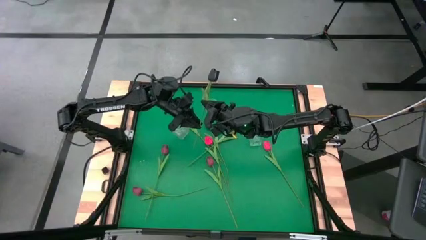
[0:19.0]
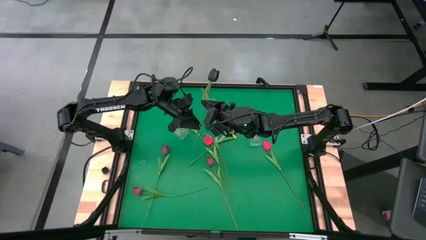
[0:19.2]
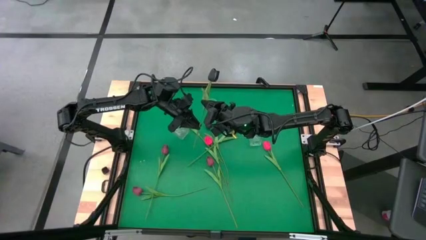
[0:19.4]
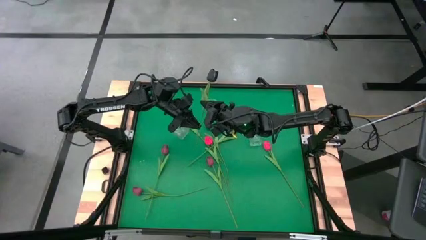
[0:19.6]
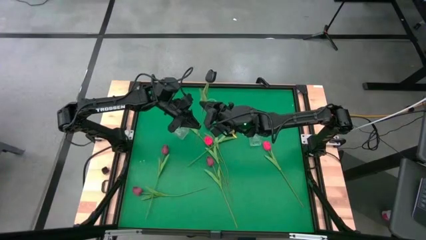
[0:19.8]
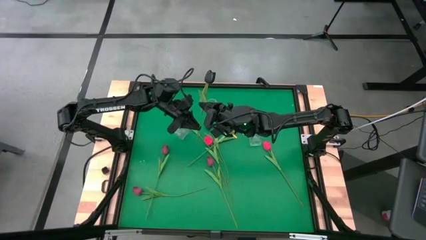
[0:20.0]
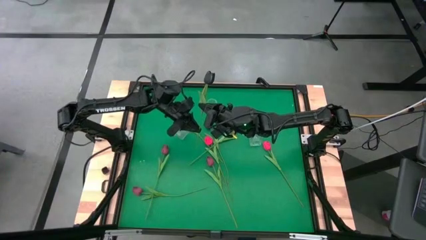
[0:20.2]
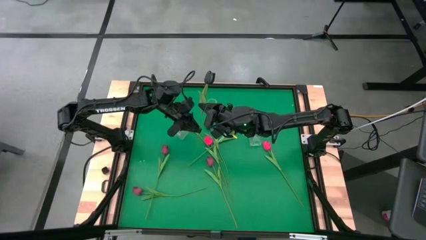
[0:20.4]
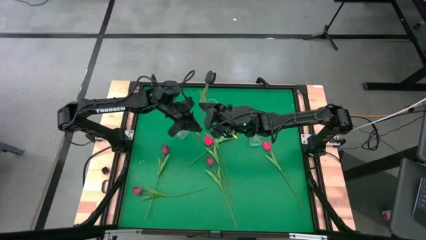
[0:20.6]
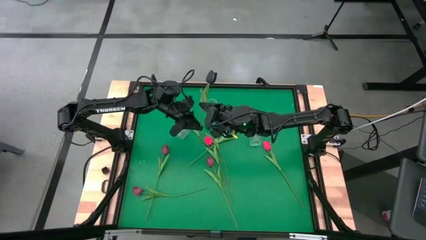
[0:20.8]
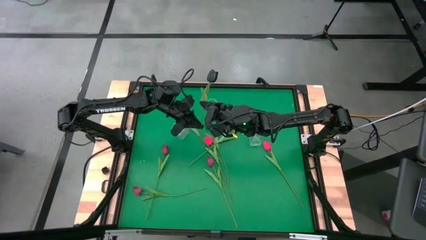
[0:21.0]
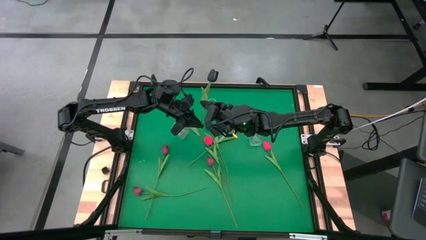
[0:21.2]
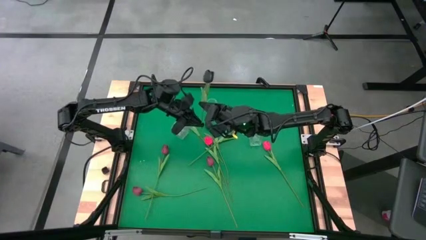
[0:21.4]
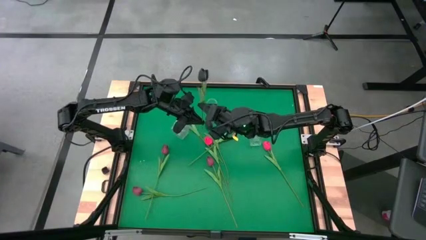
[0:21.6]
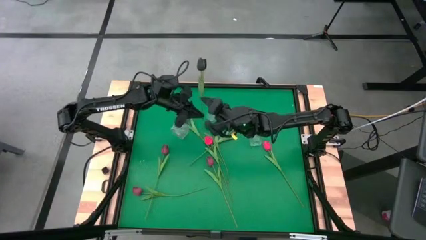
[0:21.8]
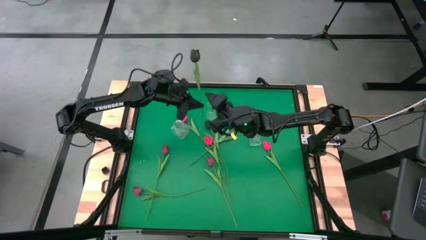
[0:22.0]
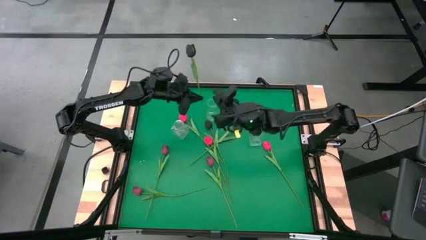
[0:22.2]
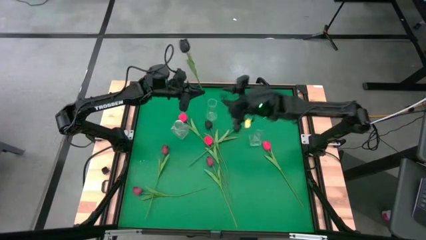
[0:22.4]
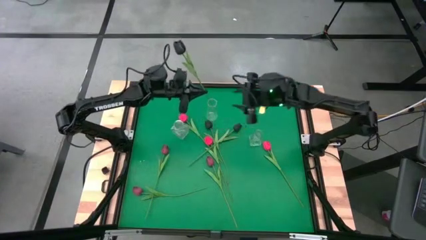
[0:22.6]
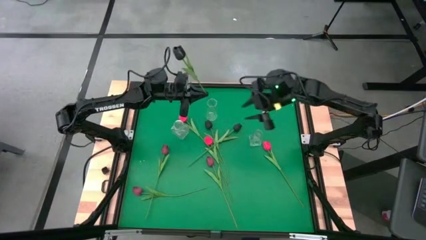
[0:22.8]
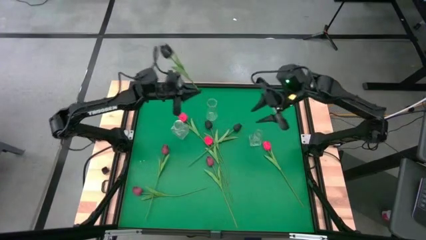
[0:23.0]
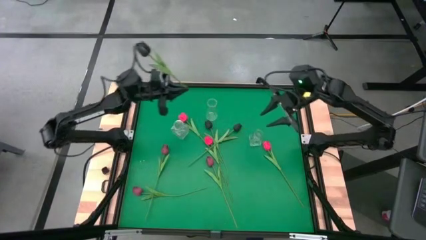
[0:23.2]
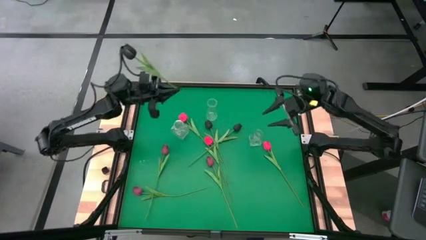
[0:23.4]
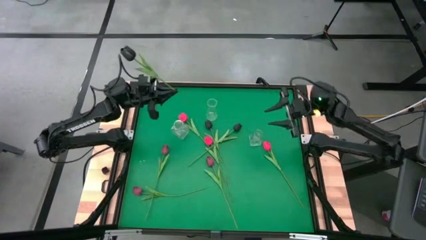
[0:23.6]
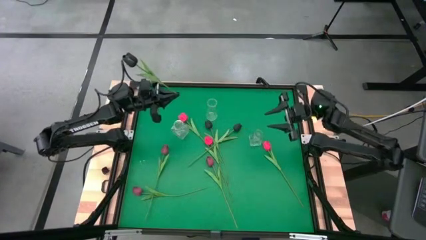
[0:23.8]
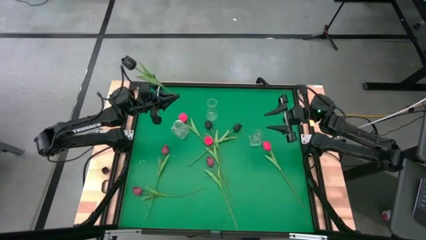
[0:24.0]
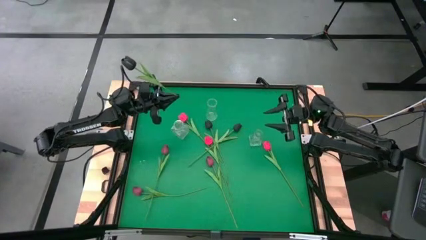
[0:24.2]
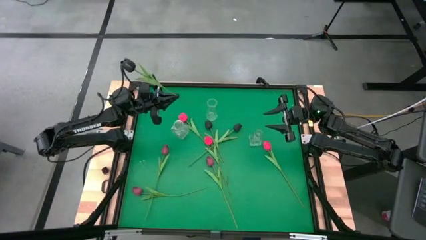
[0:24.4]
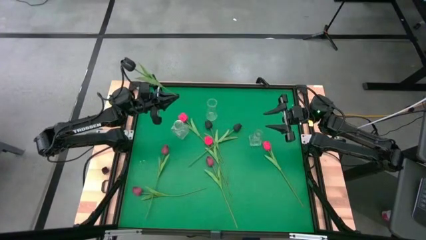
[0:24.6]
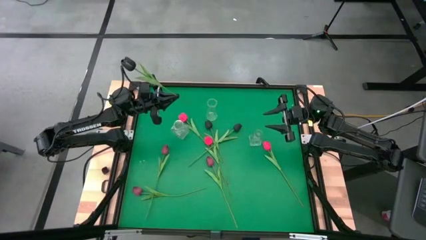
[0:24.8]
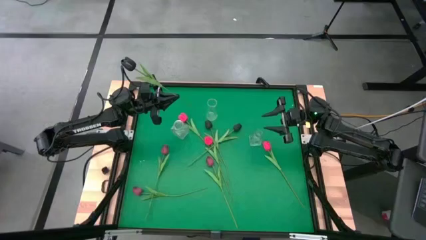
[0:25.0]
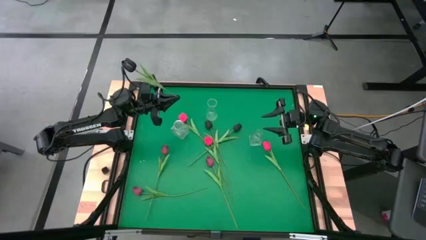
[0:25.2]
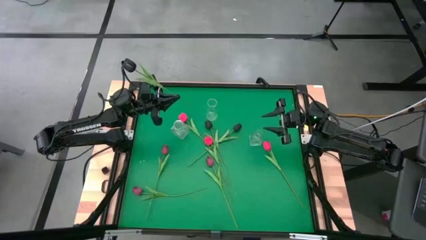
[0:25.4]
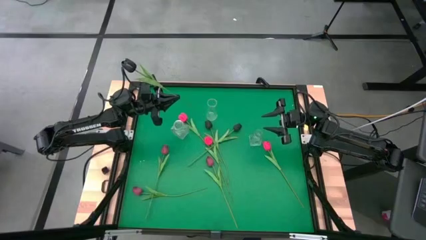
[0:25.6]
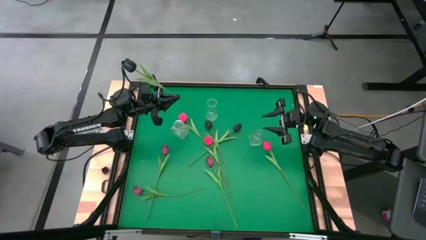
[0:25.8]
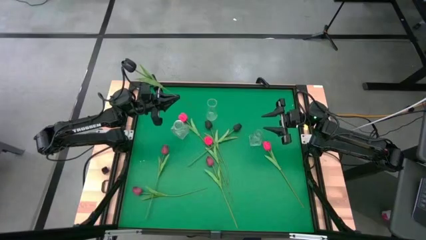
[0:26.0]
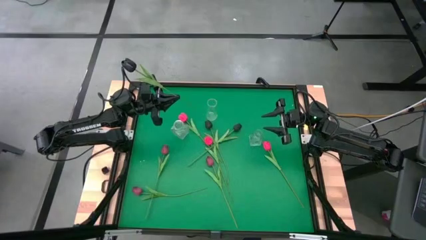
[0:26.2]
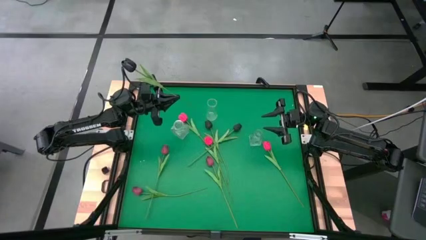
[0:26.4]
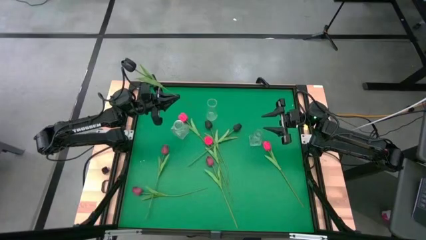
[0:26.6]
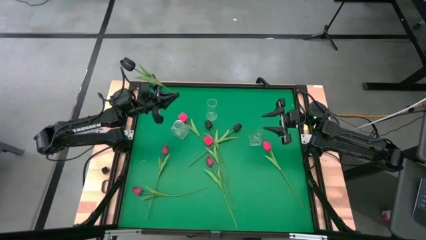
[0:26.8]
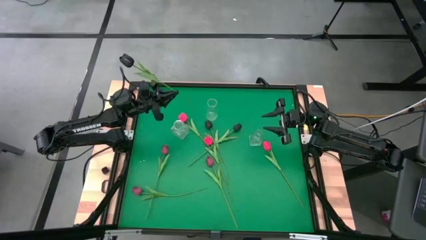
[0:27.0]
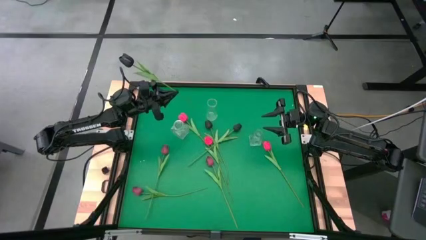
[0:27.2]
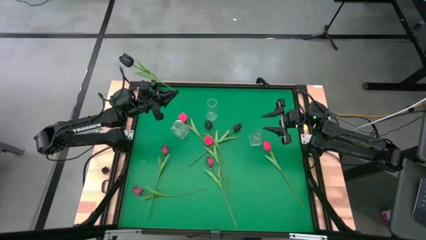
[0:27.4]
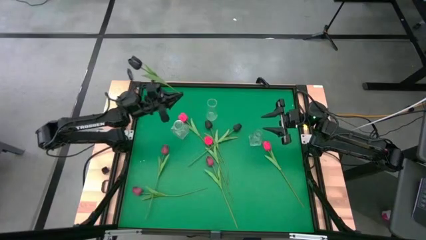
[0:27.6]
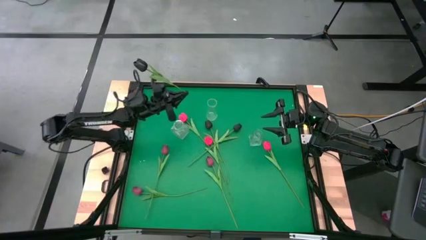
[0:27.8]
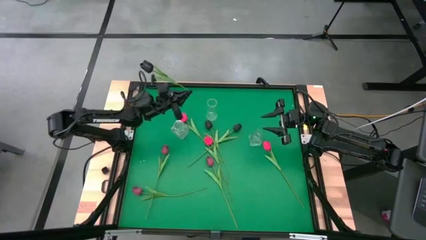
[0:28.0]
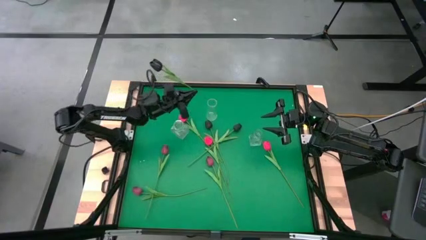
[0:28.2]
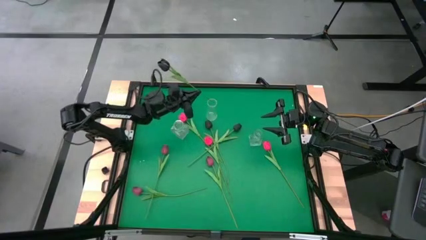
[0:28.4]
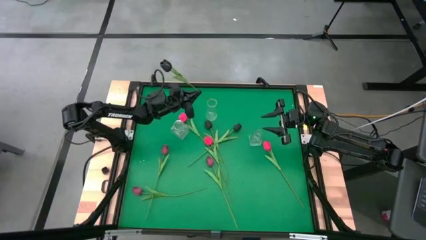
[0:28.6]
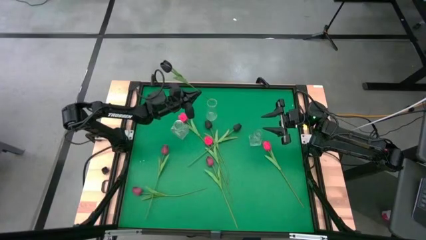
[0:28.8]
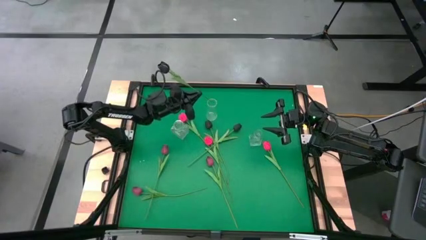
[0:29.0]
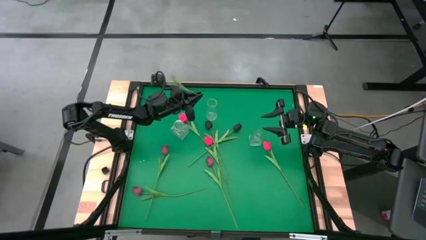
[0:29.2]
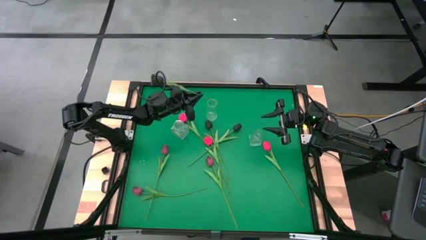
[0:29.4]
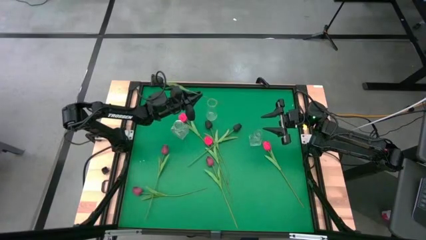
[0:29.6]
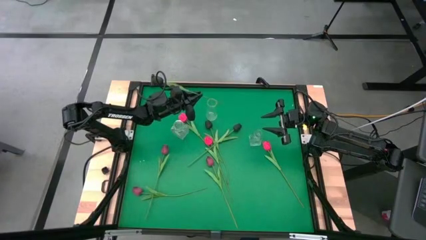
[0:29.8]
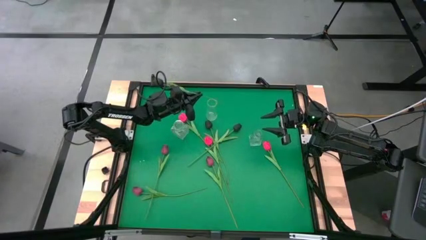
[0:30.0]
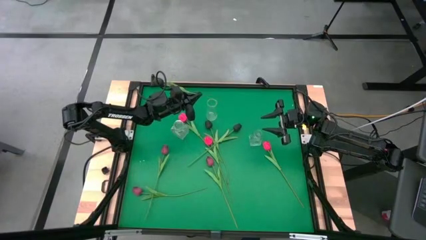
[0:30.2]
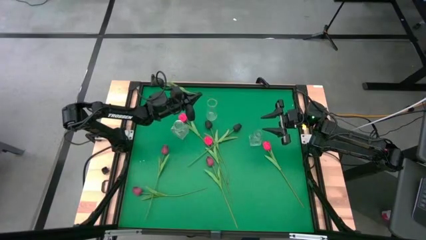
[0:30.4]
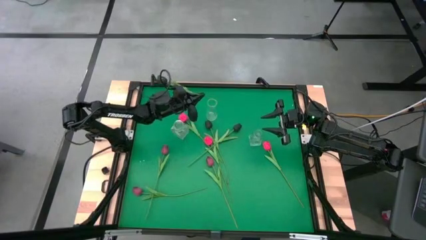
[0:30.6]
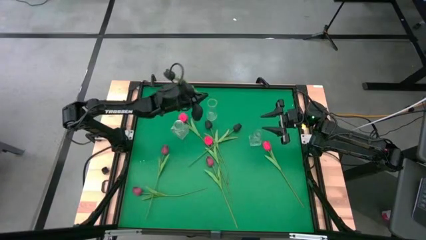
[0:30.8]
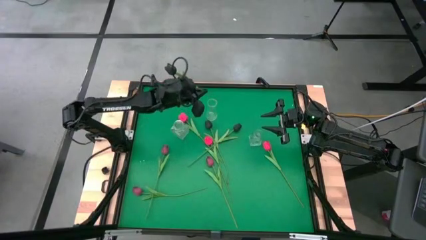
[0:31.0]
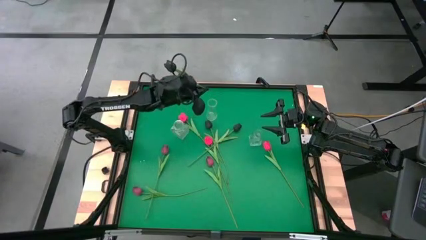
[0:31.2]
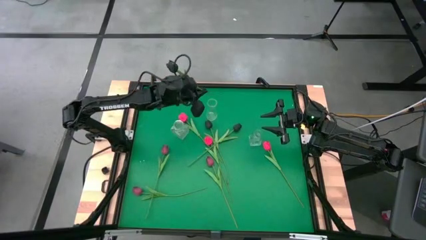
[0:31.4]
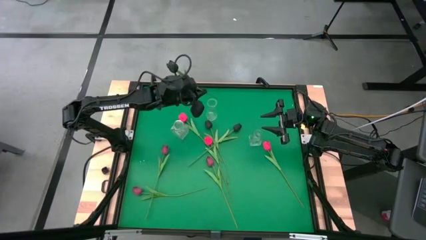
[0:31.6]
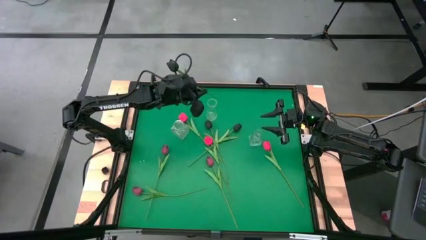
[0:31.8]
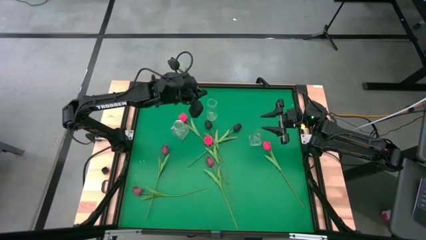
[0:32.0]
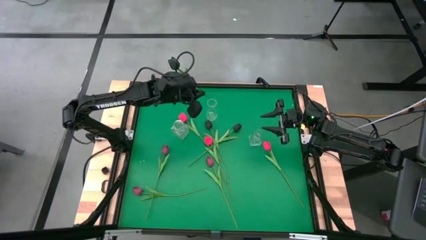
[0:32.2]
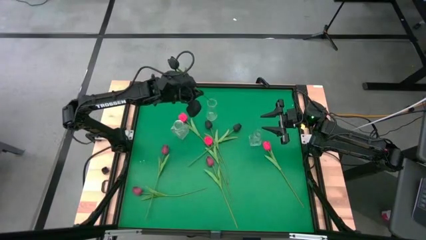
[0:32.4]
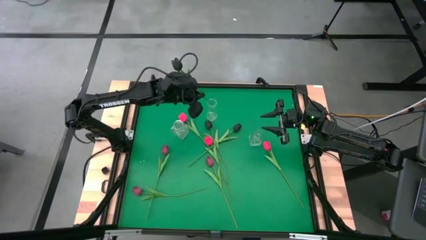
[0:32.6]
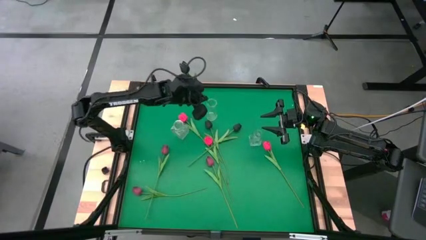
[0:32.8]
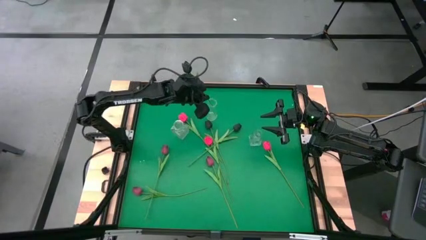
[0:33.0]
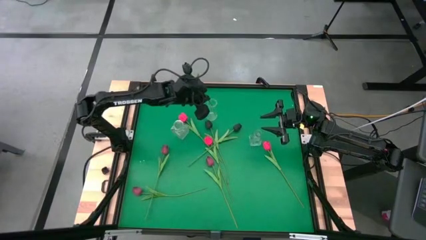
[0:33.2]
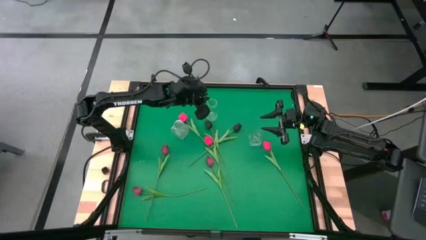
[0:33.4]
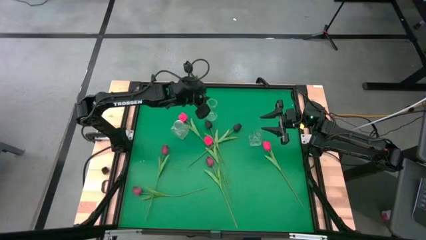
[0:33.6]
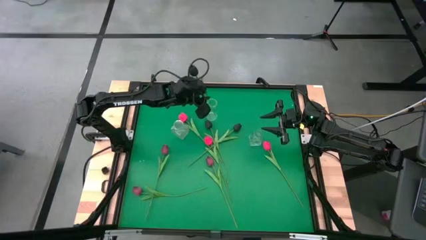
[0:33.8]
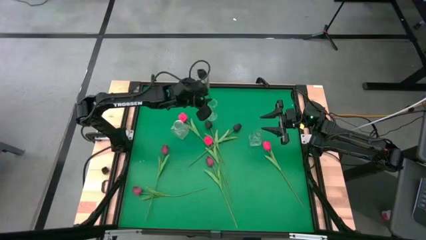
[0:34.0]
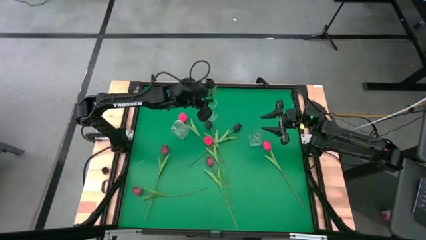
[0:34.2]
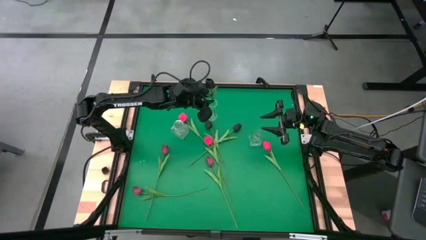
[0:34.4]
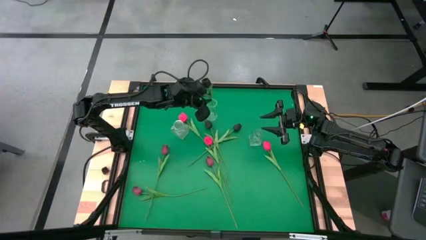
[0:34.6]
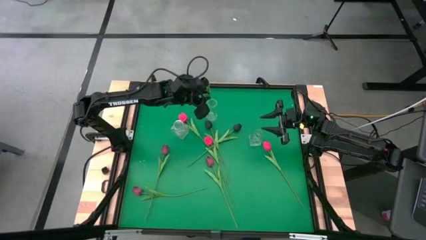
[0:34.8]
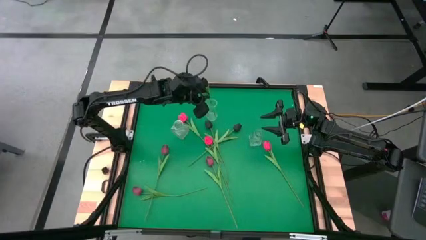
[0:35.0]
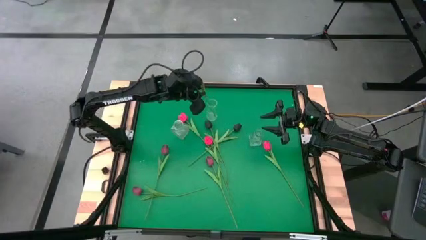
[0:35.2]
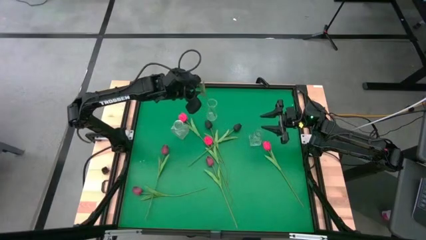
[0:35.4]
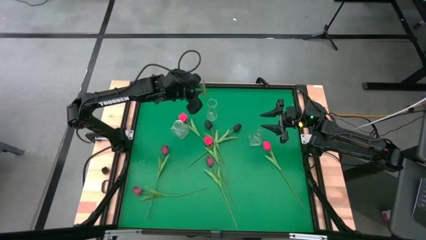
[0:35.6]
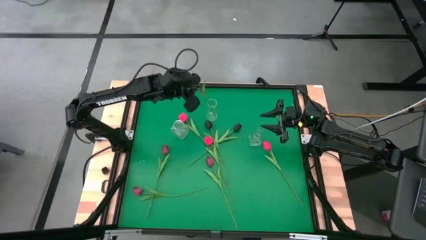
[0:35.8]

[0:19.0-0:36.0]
Task: Sort flowers into vase by color
Put the right black tulip into the top transparent vase
